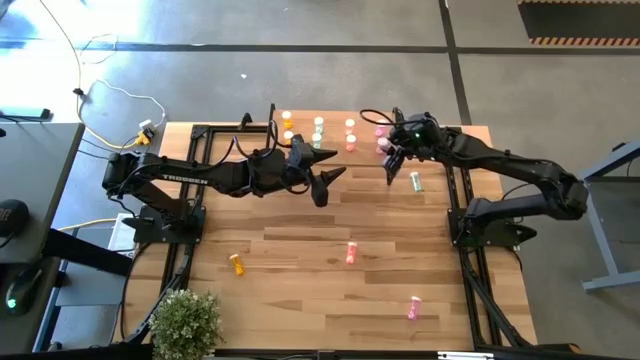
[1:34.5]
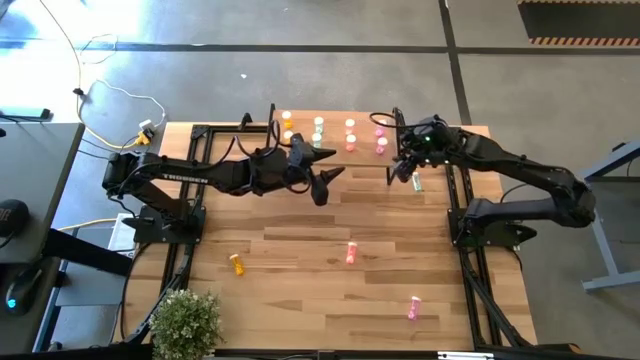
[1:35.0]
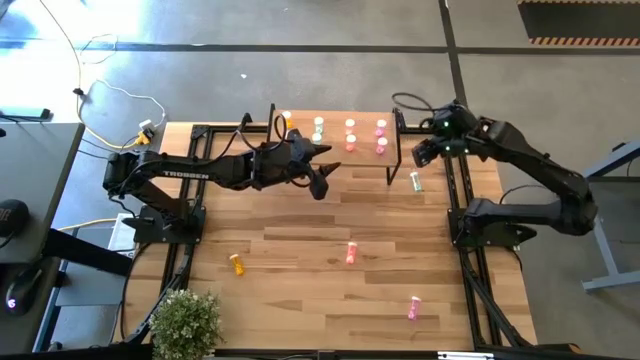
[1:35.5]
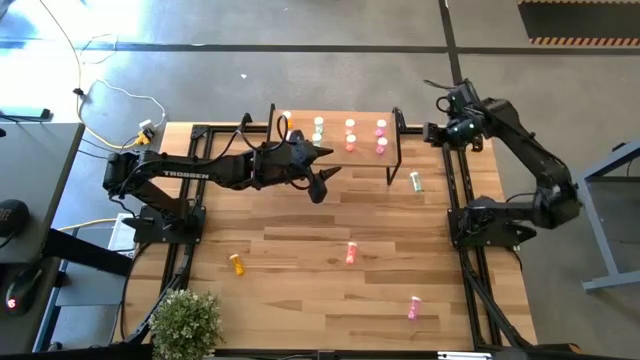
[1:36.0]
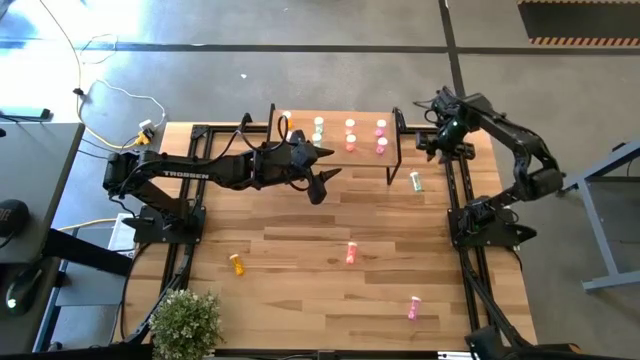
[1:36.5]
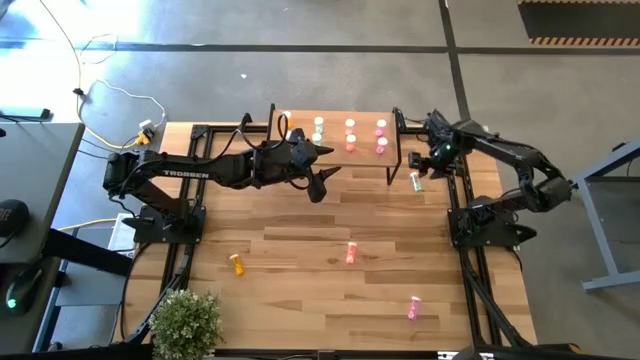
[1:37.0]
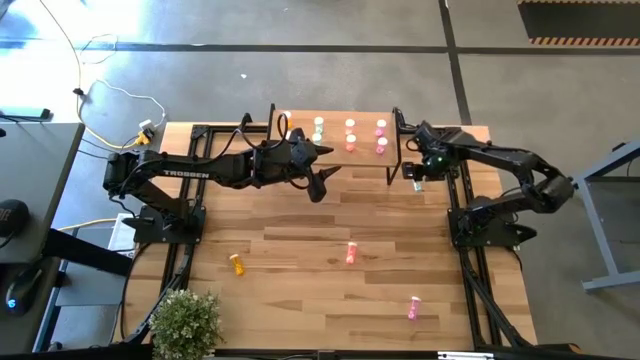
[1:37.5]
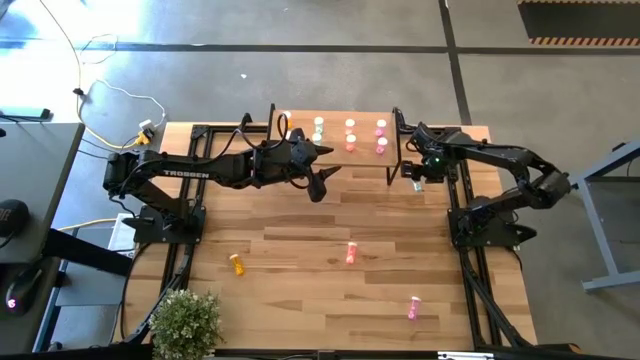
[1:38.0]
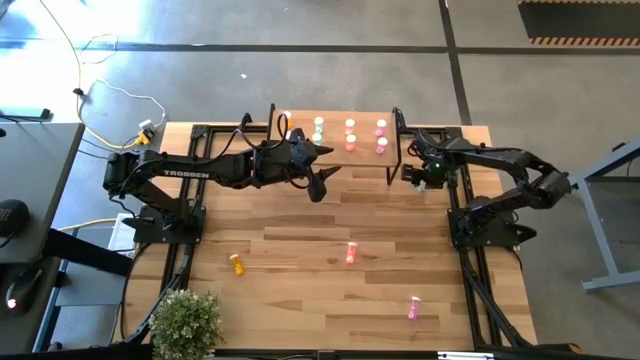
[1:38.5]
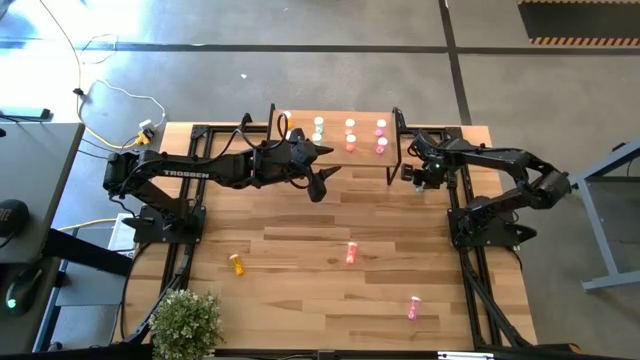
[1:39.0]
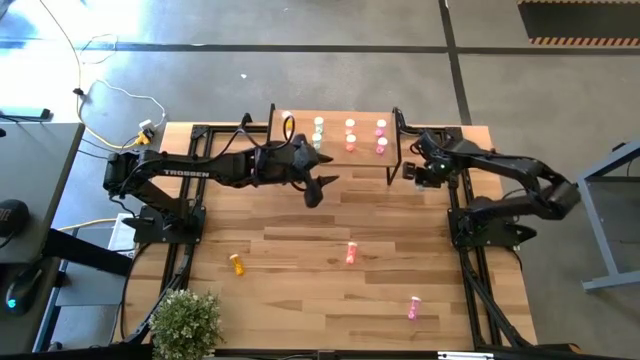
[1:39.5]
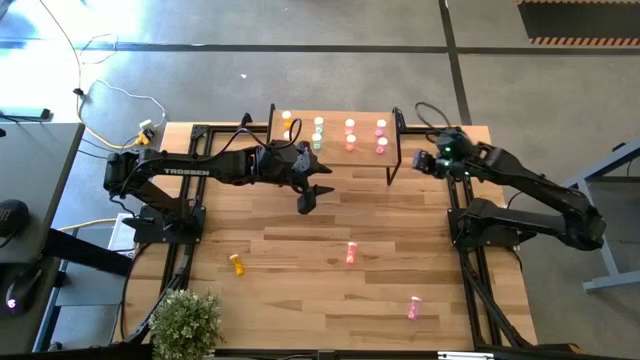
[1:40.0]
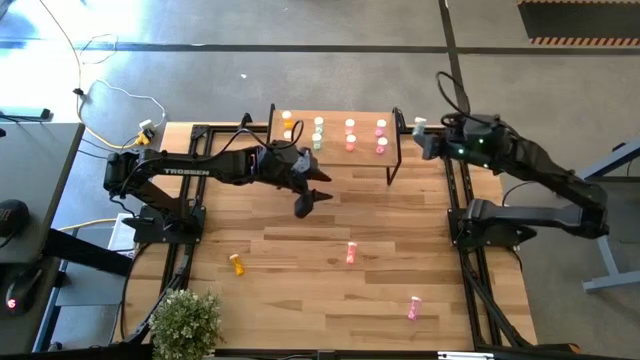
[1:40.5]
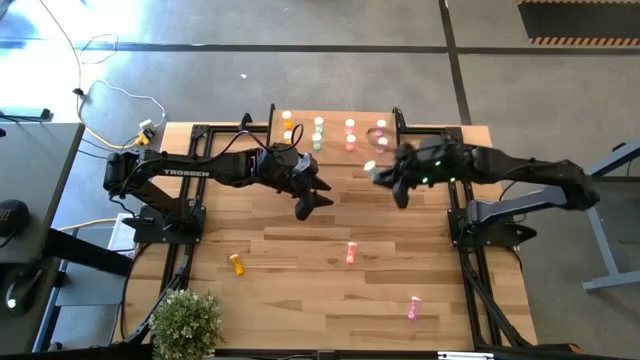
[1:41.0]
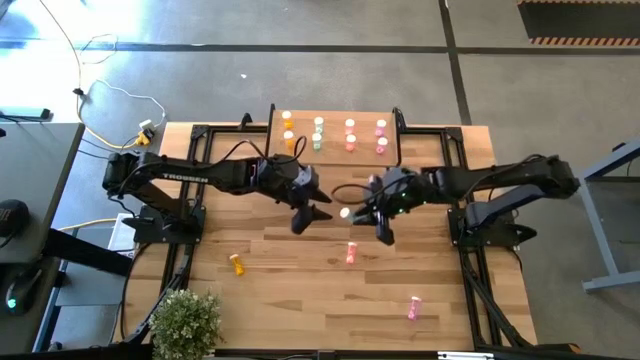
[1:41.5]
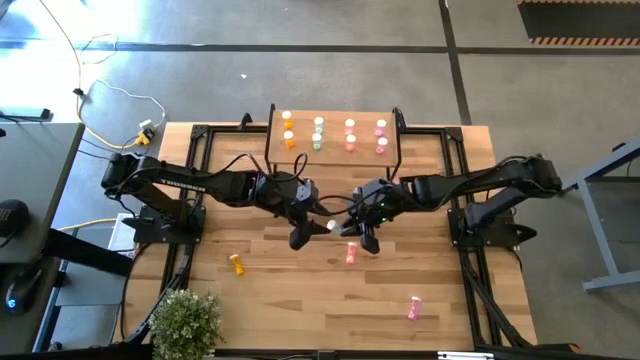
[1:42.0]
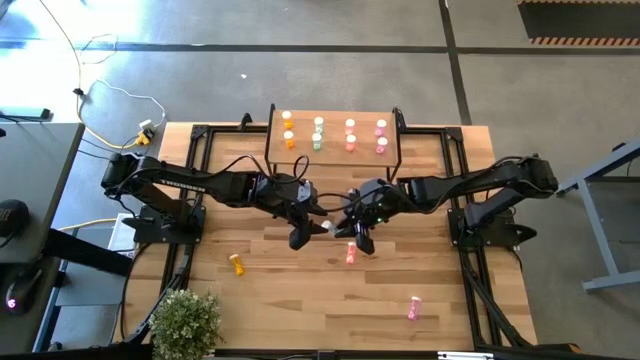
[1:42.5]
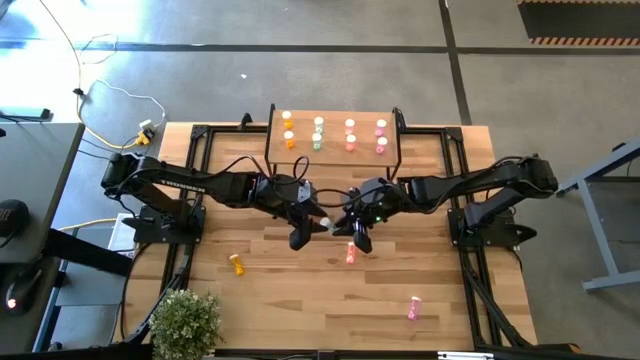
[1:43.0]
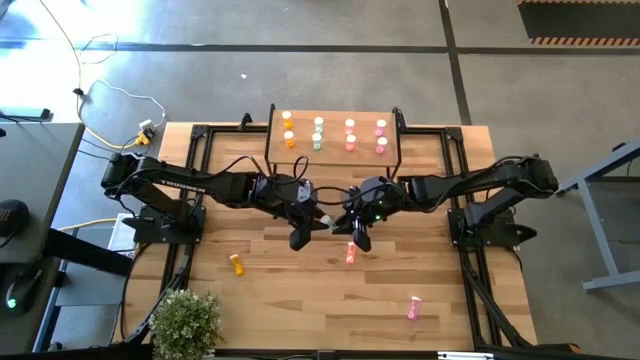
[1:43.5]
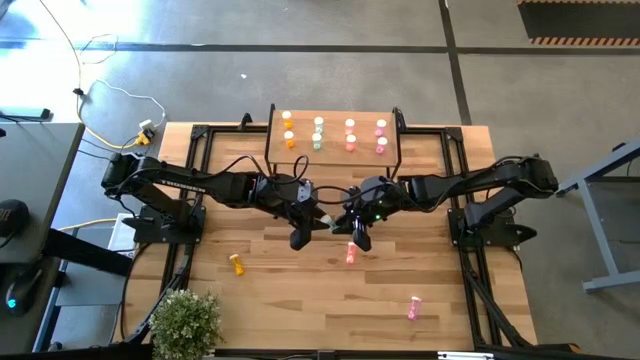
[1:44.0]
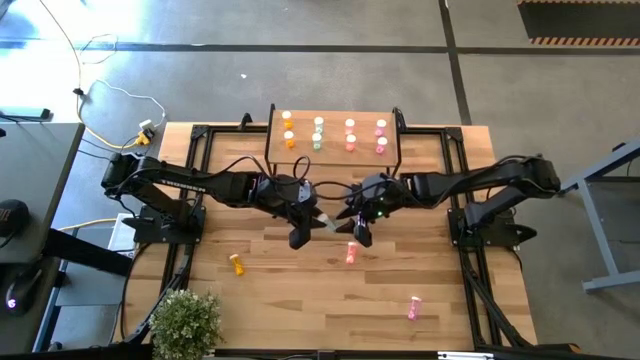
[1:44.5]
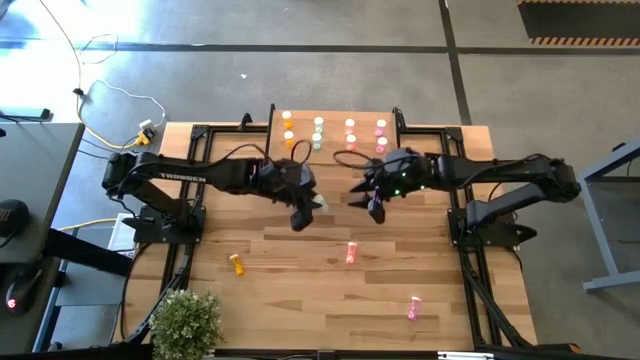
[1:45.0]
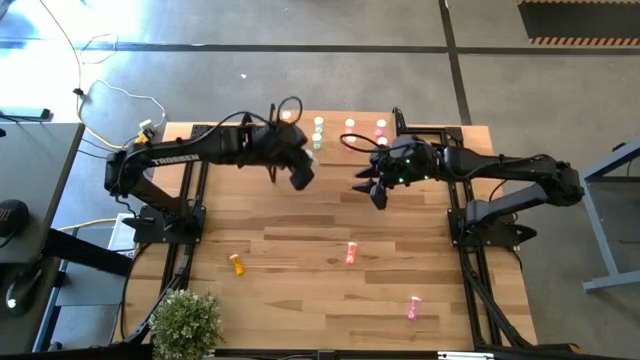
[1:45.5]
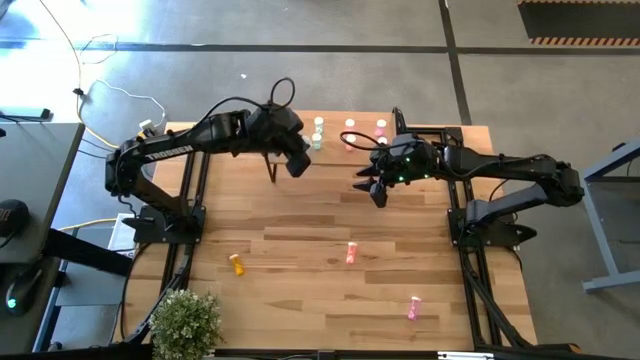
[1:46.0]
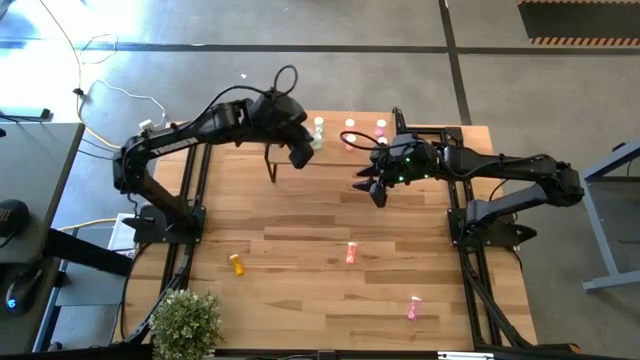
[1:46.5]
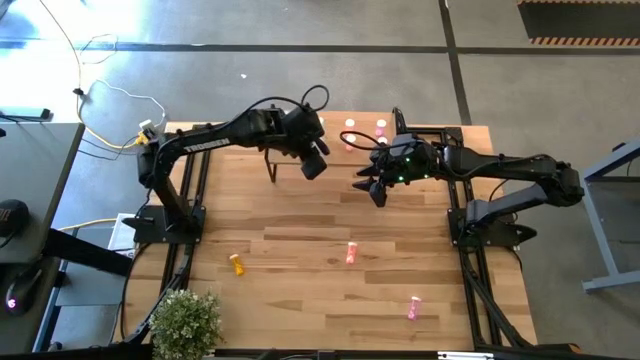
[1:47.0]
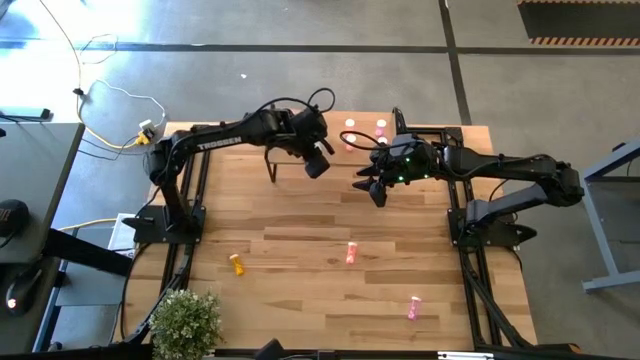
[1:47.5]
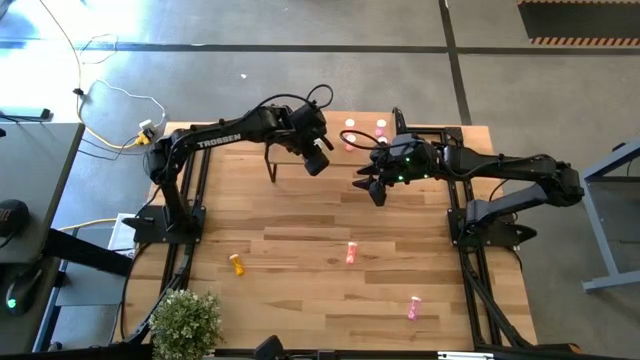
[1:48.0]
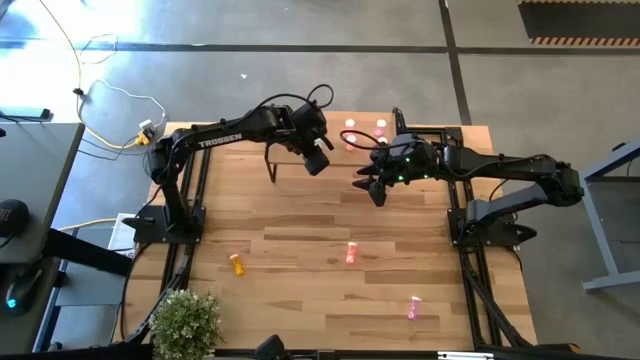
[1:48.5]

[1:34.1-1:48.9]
Task: Pick and place medicine bottles onto shelf by color
Put the green pill bottle on the shelf aligned with the green pill bottles

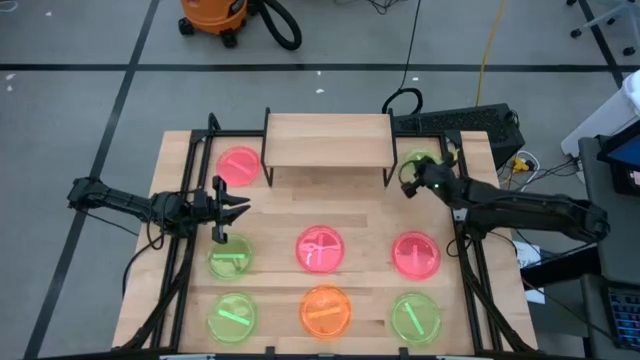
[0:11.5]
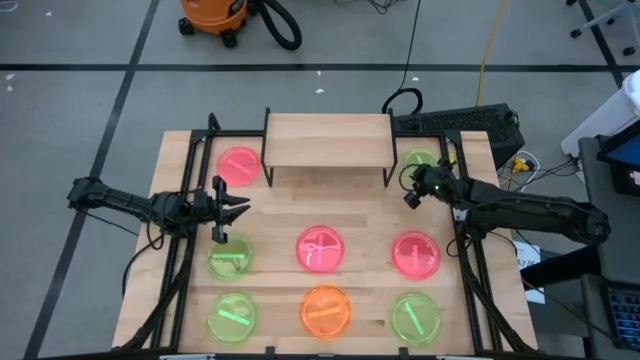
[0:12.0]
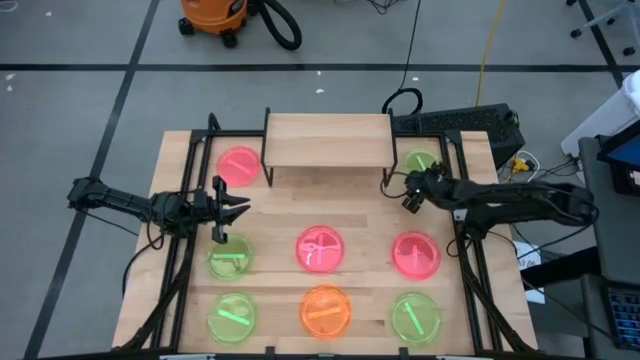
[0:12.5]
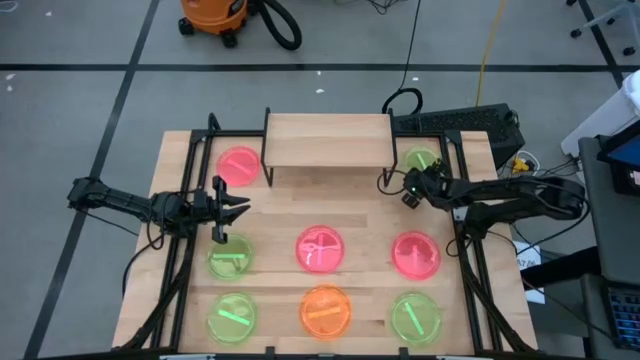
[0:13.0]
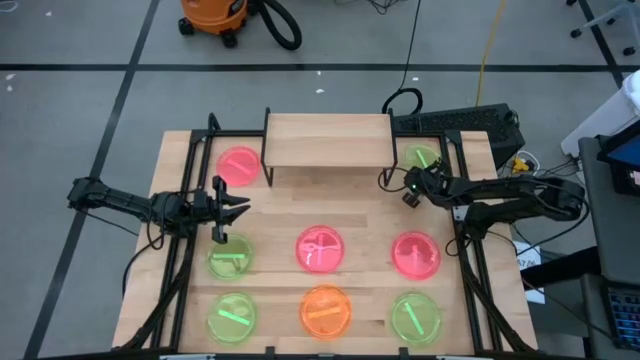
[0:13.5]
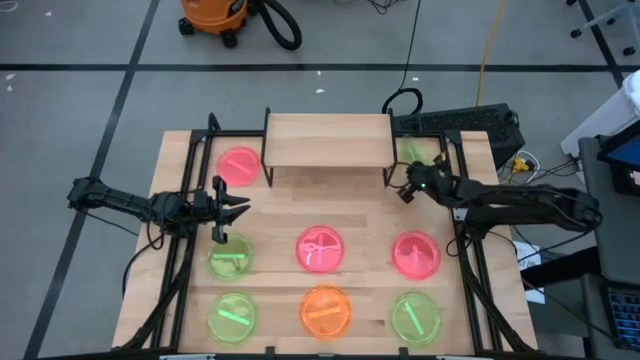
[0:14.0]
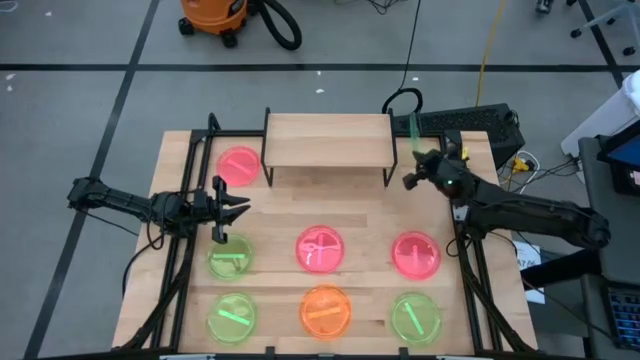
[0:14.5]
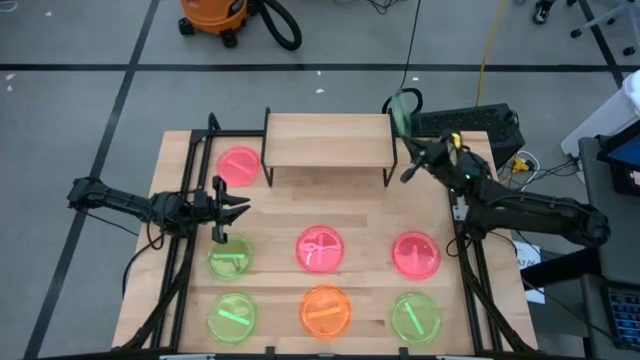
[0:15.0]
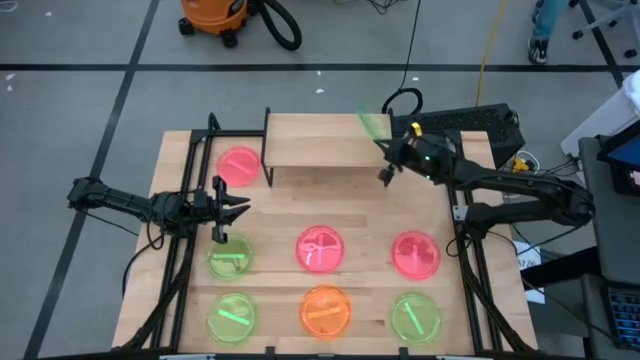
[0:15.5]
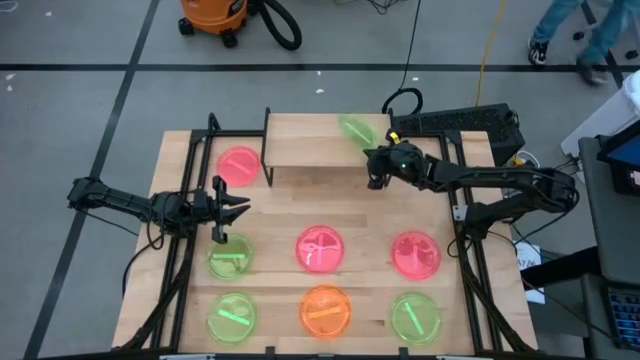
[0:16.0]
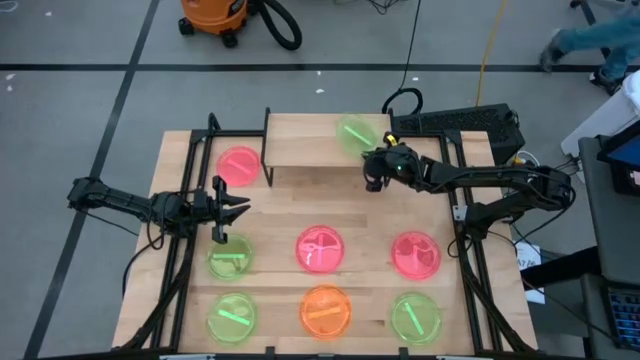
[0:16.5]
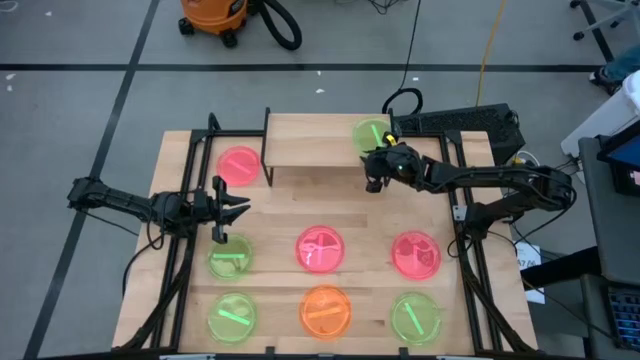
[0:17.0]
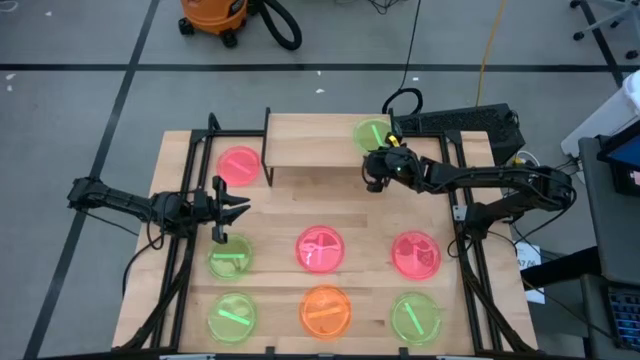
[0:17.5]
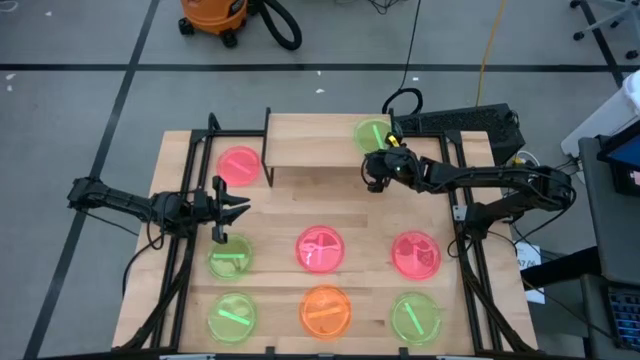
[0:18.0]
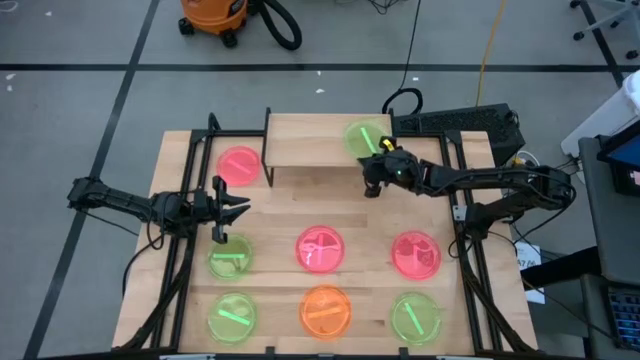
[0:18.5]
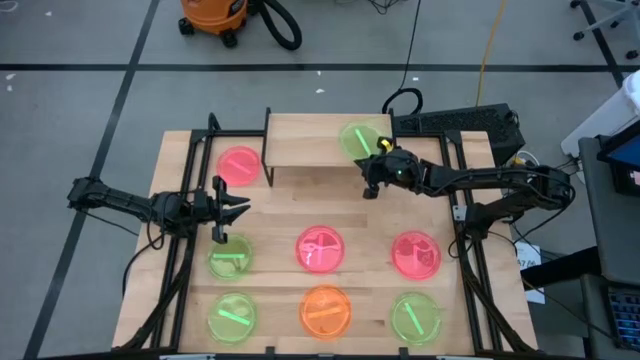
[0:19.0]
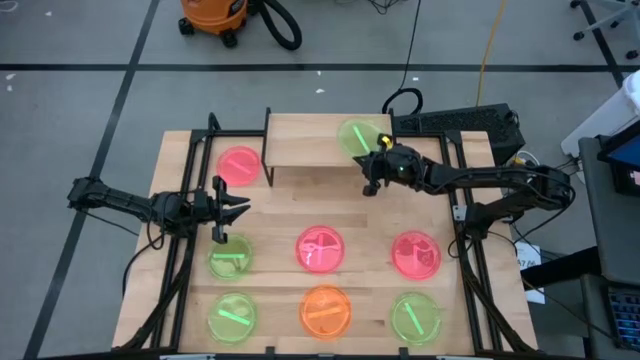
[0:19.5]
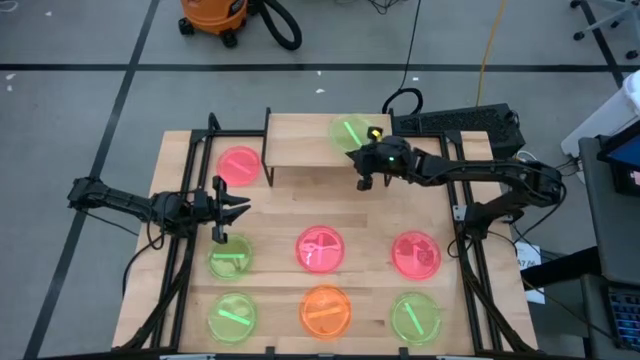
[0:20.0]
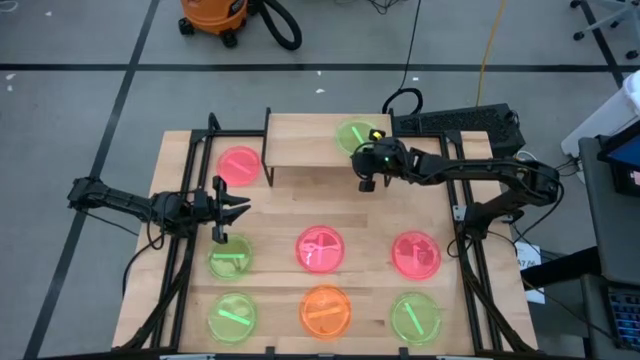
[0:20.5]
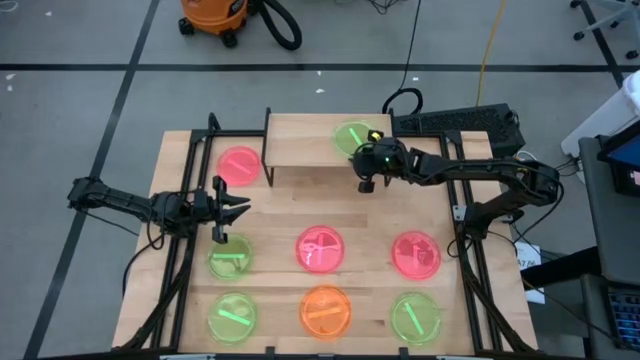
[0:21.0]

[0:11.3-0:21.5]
Task: Place and stack plates onto a shelf
Put the green plate on the shelf
